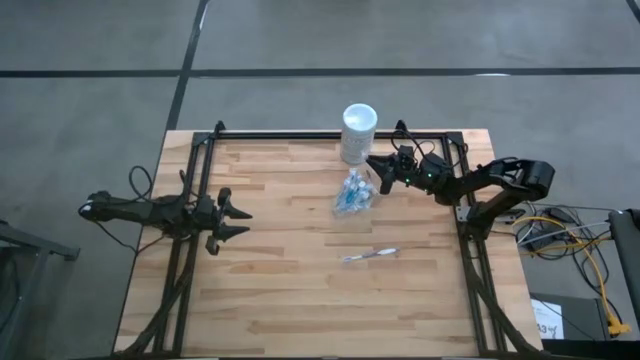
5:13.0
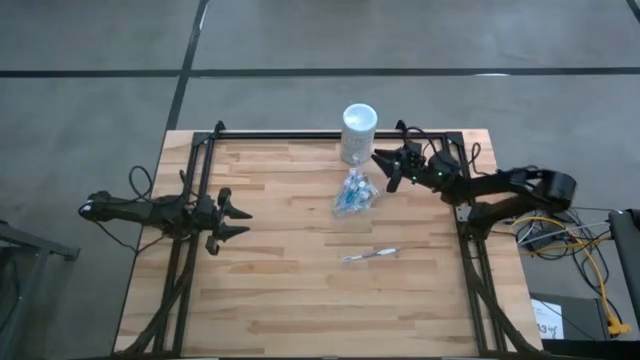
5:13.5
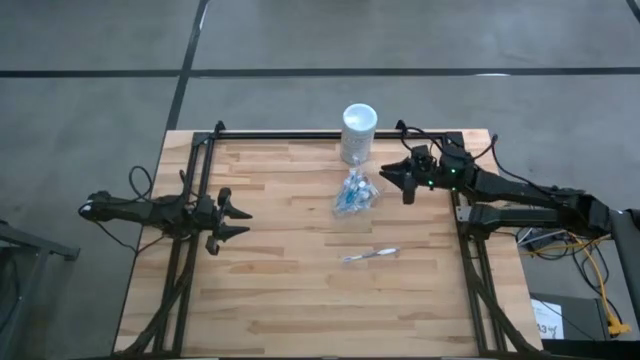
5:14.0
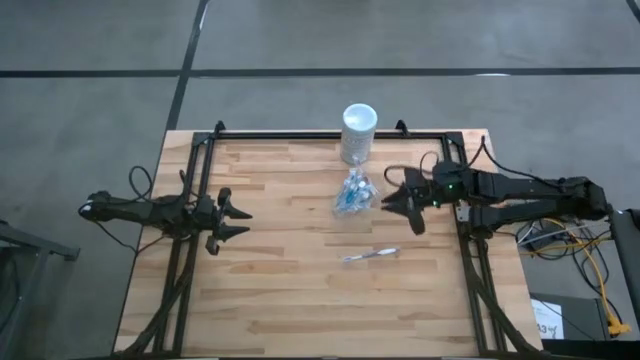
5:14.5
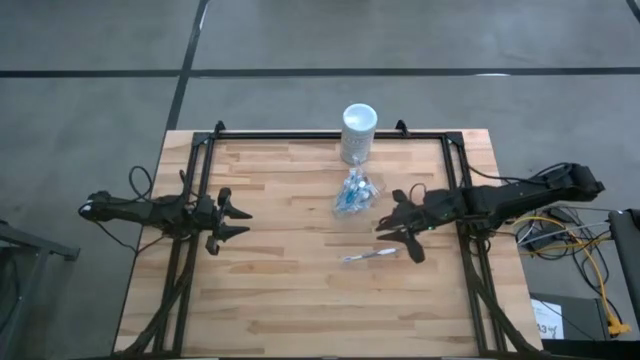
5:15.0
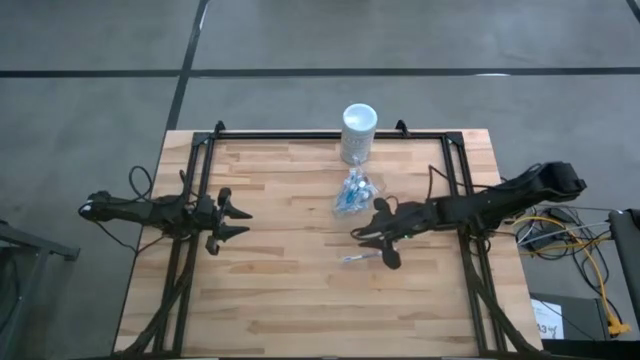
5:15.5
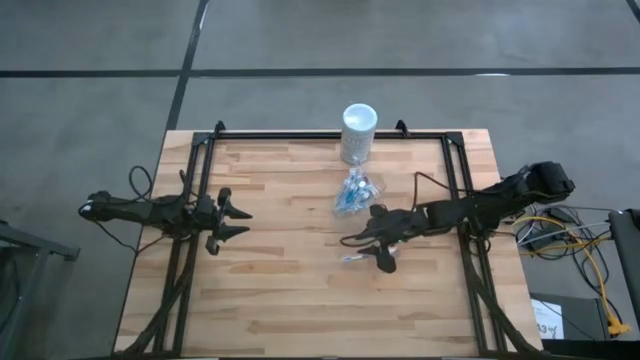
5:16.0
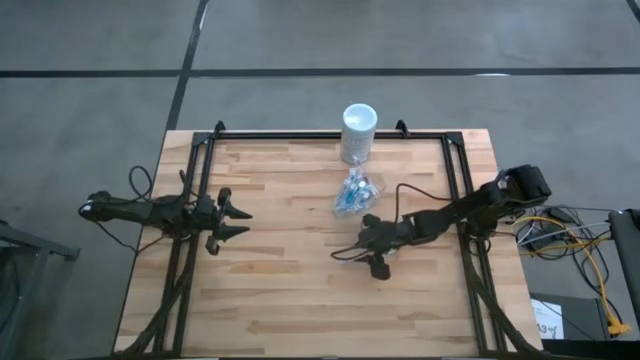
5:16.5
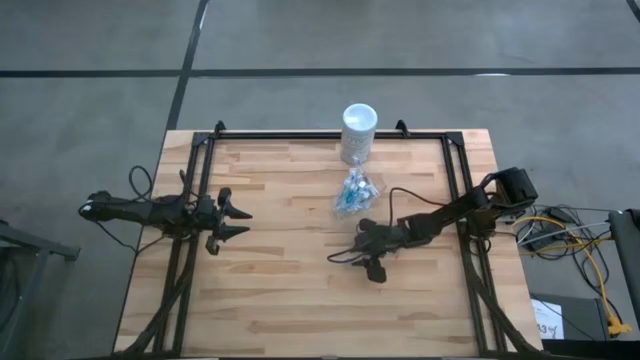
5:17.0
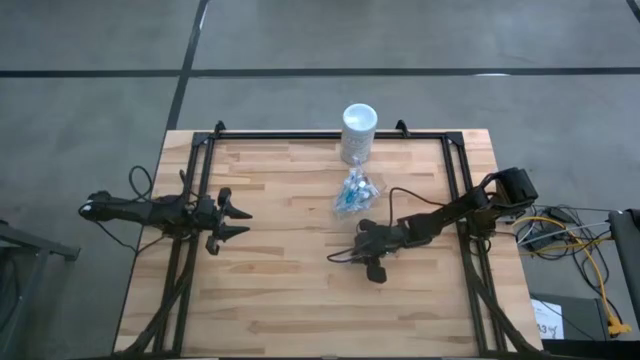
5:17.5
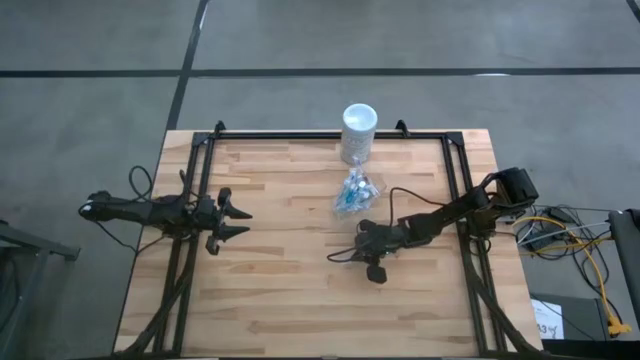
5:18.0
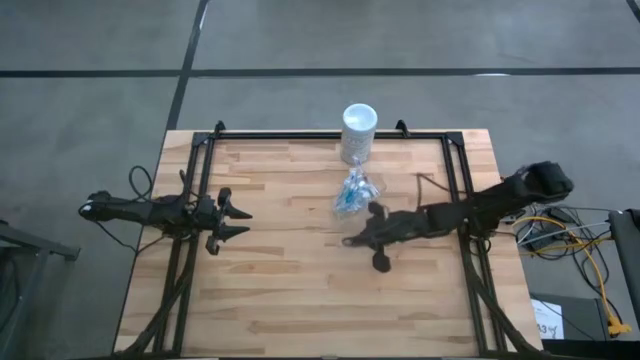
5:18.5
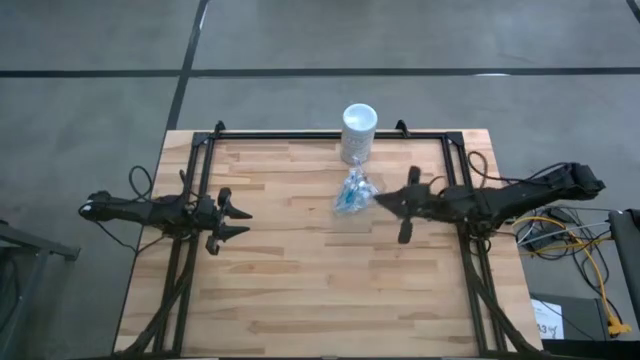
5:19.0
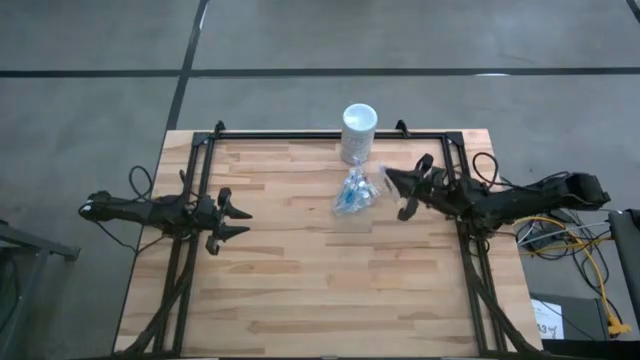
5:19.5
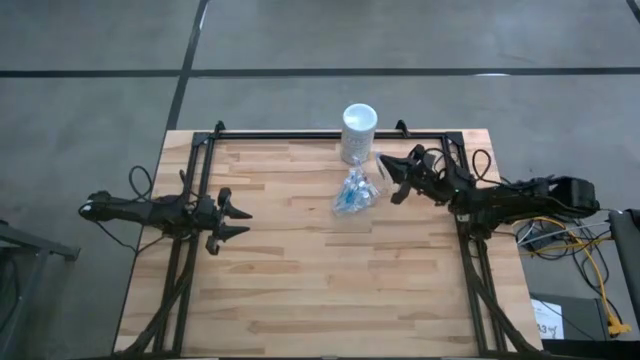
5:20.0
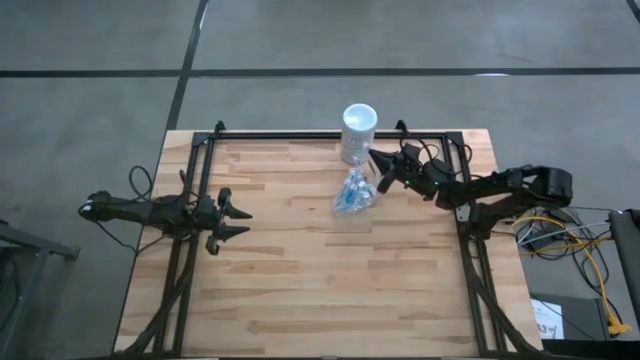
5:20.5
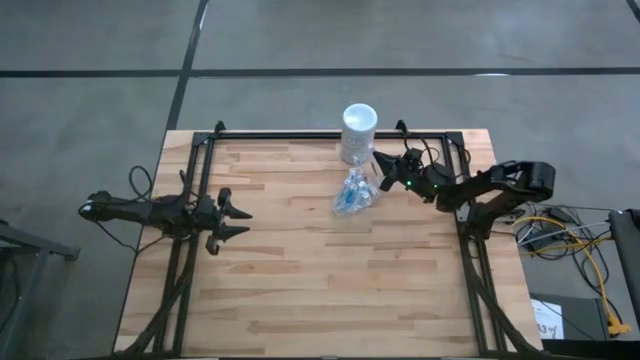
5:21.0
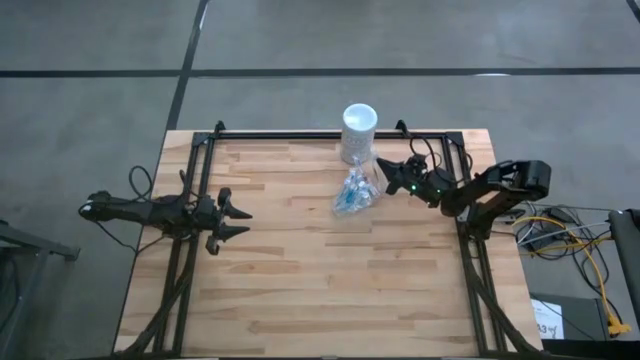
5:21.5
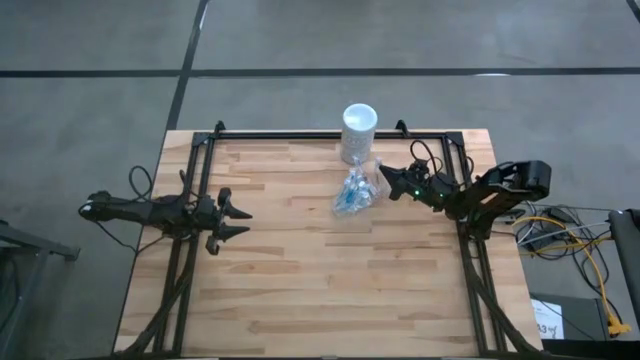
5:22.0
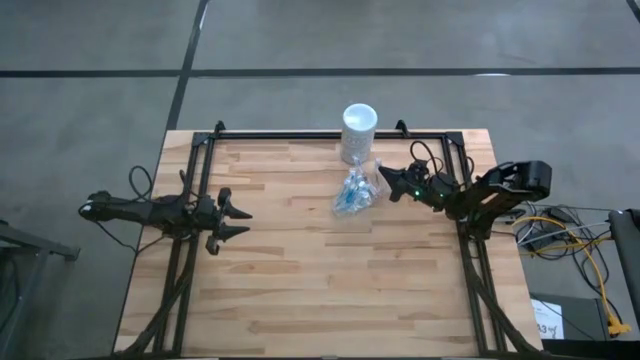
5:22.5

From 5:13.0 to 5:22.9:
Task: Pick & Place toothbrushing station
Put the purple toothbrush into the transparent organizer

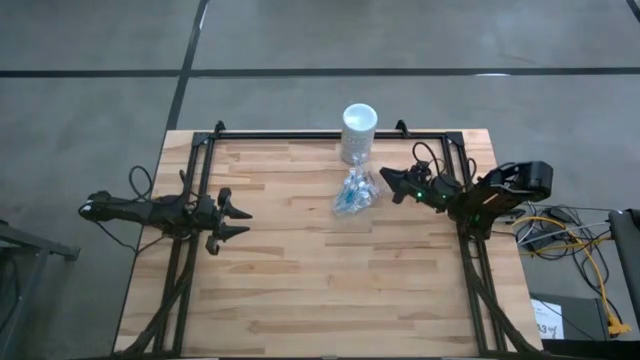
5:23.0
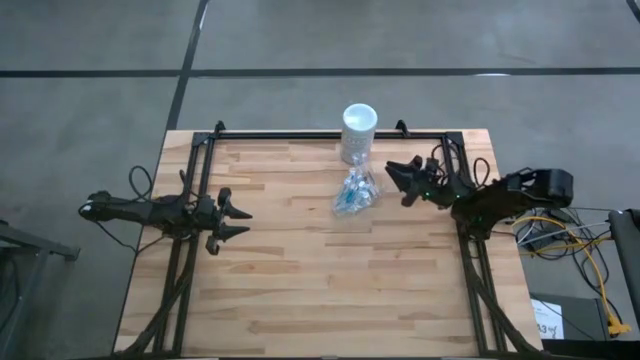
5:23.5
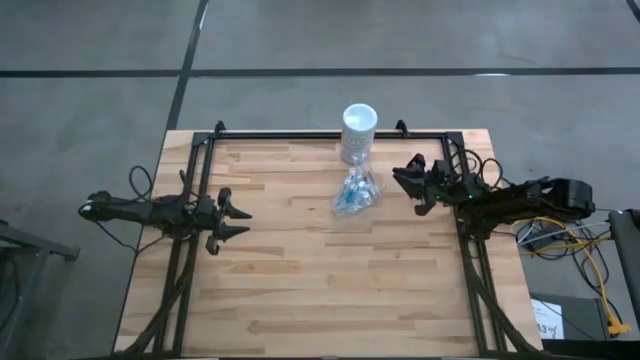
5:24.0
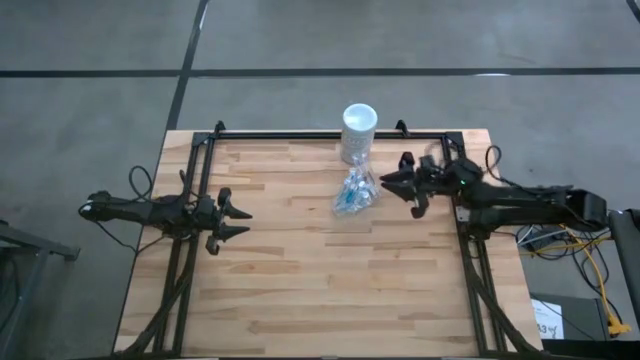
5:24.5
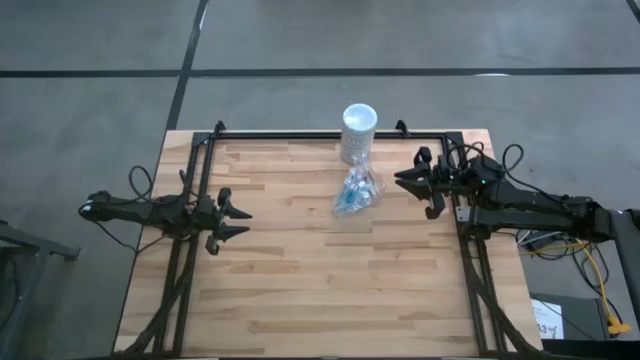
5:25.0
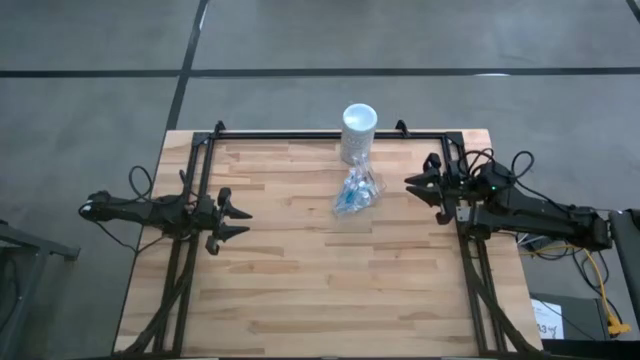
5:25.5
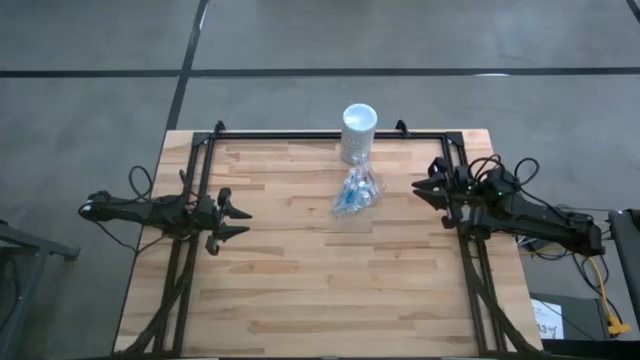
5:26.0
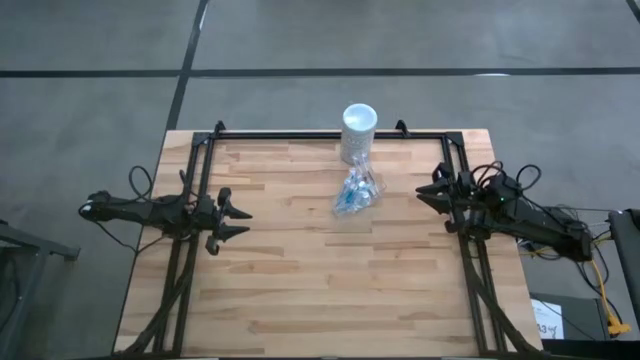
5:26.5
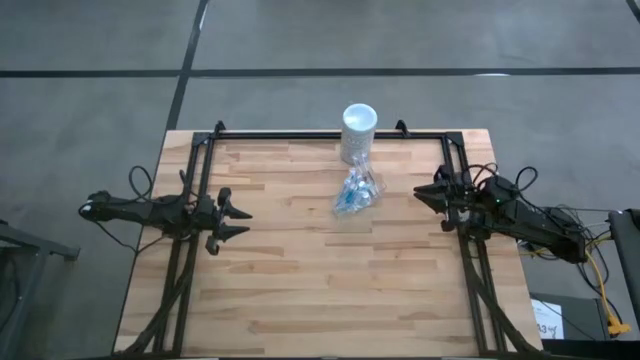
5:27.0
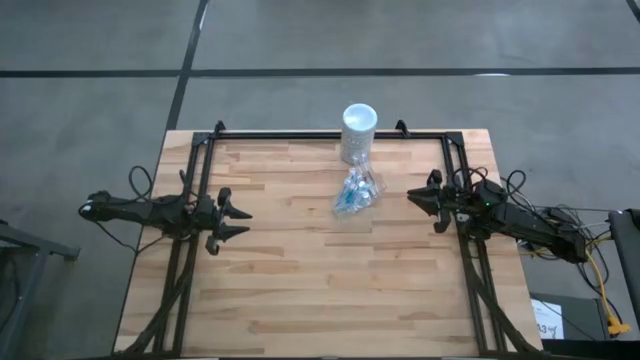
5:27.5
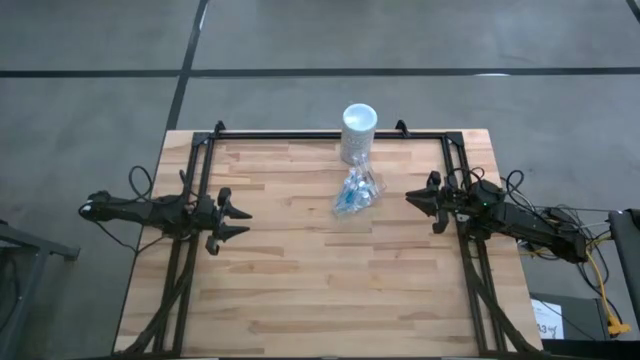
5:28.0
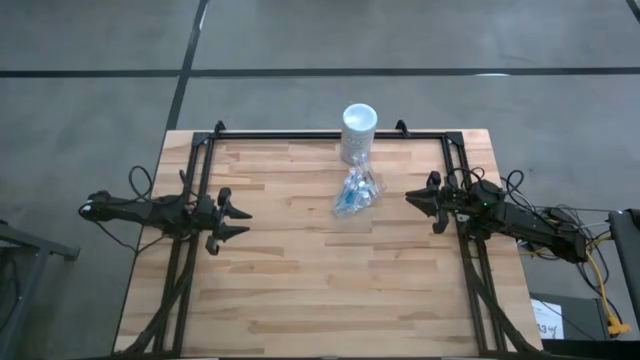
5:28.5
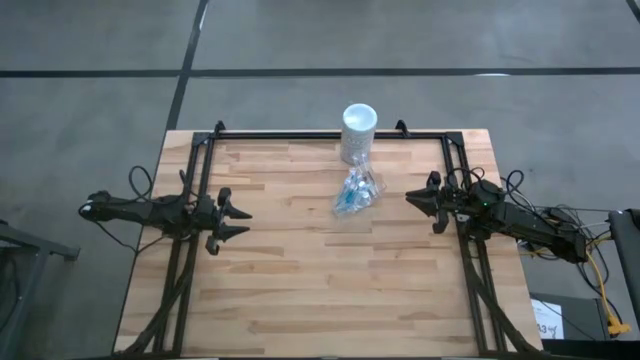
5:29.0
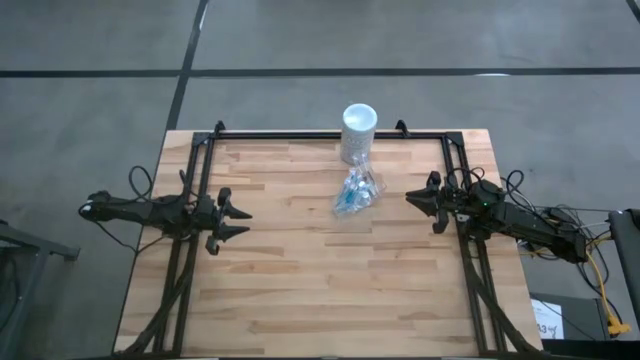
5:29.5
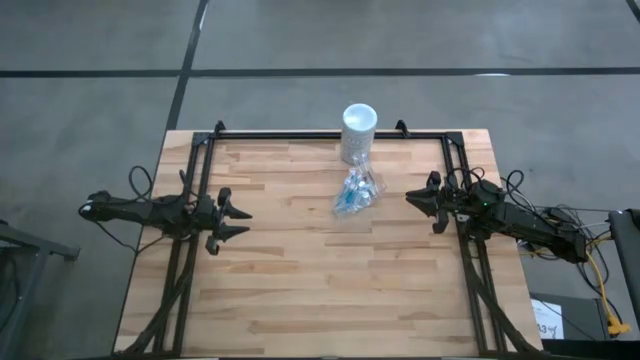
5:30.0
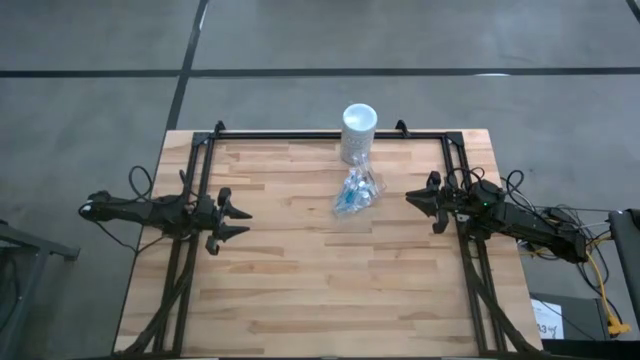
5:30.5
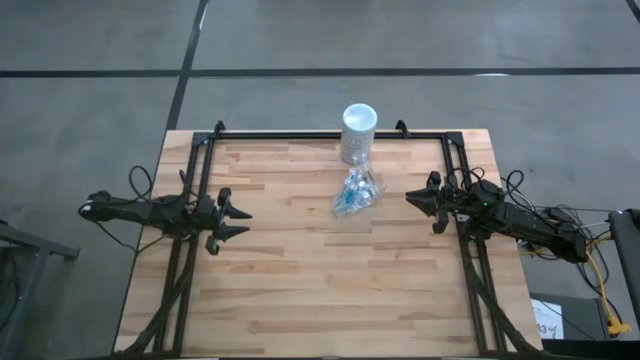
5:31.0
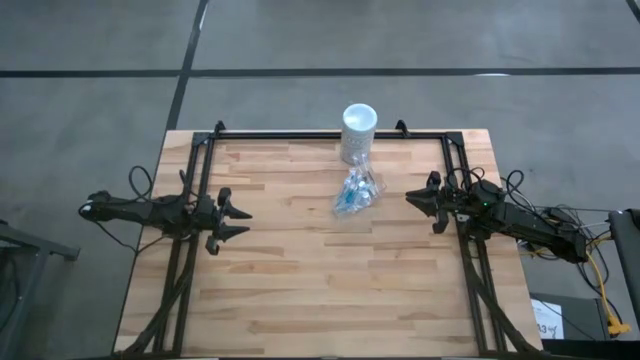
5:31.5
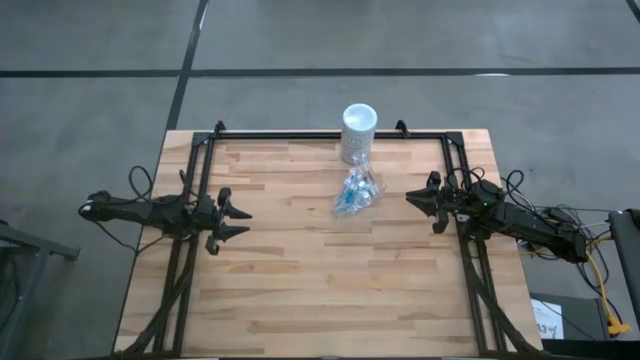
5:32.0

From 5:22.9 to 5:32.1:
Return to Home Position

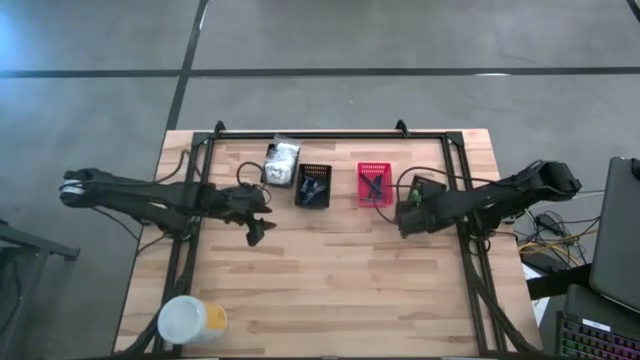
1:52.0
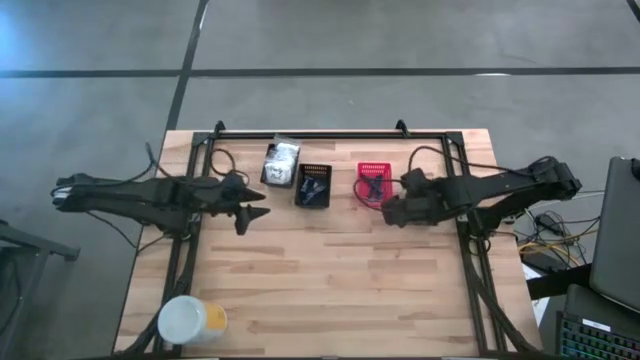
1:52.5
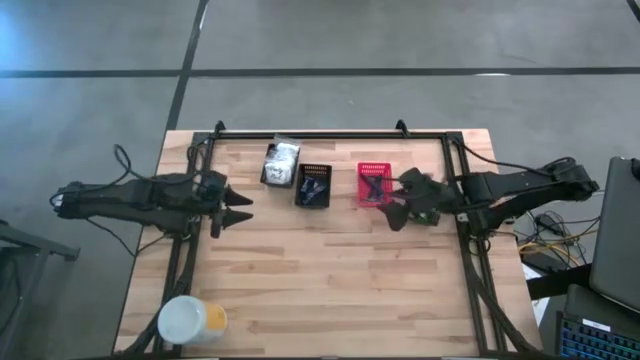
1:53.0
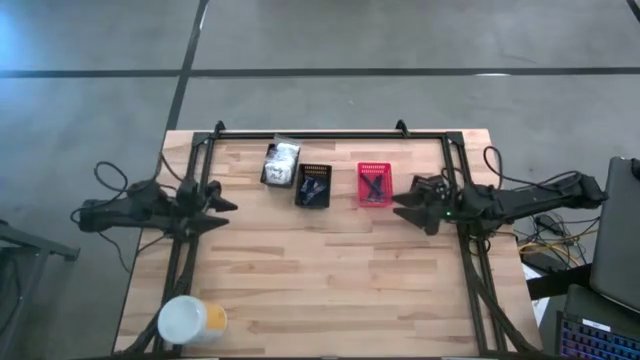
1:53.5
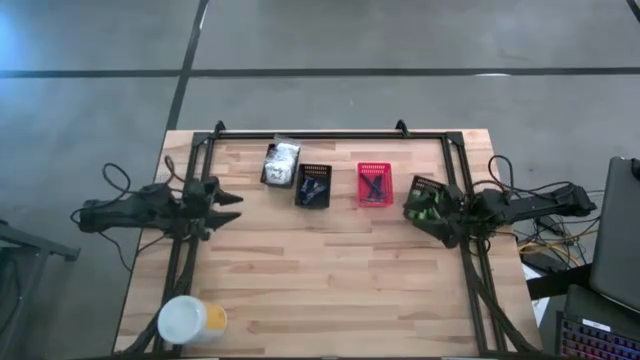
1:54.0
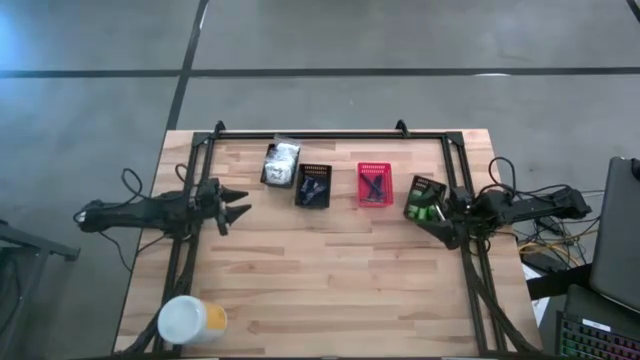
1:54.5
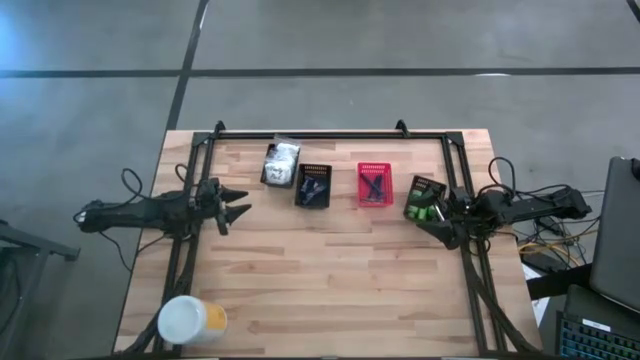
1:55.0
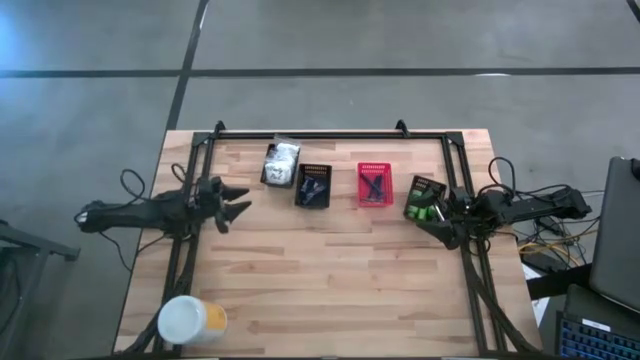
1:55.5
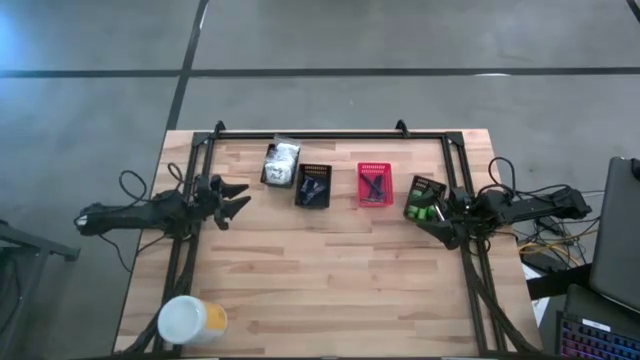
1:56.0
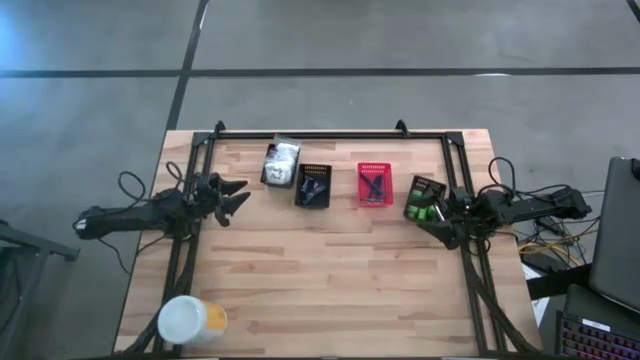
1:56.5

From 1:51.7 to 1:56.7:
Task: Pick & Place Travel size toiletries
Return to Home Position
